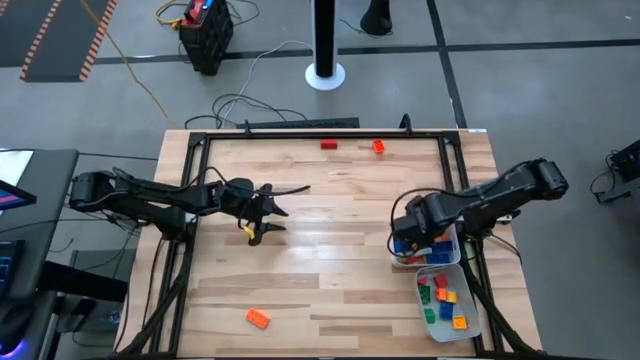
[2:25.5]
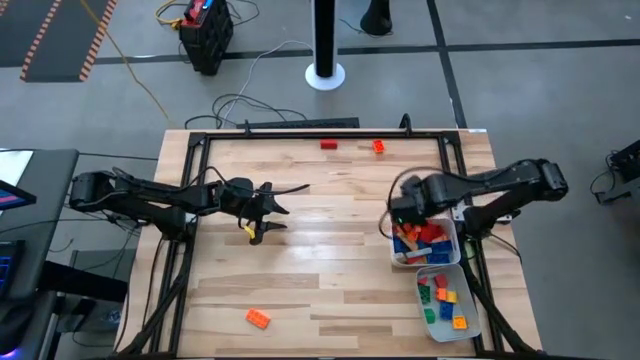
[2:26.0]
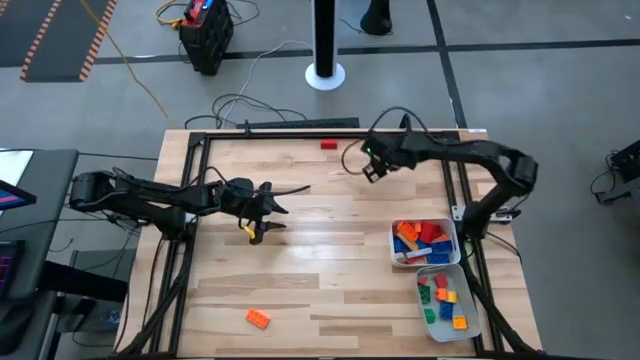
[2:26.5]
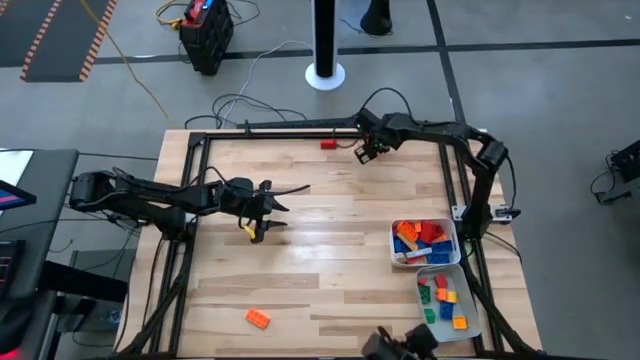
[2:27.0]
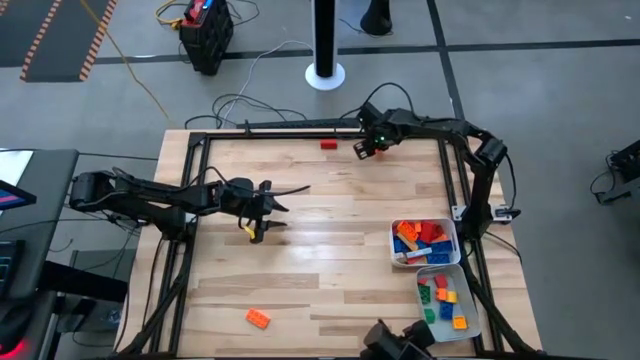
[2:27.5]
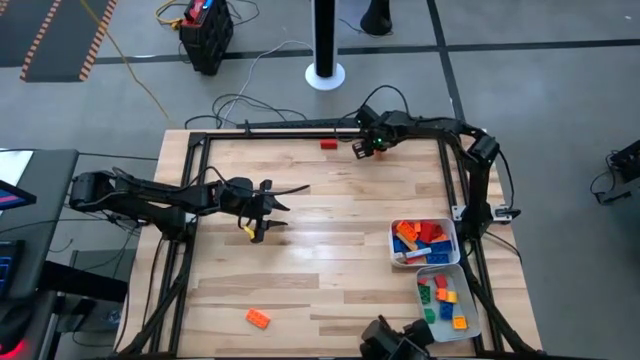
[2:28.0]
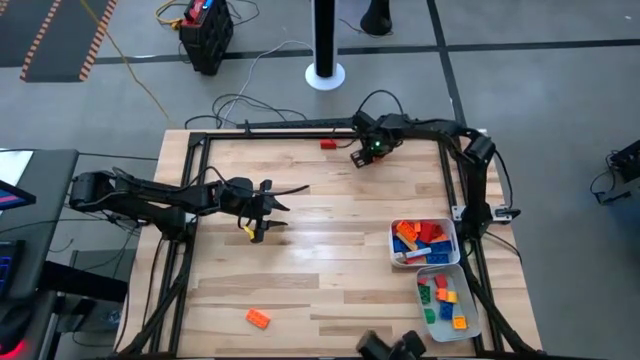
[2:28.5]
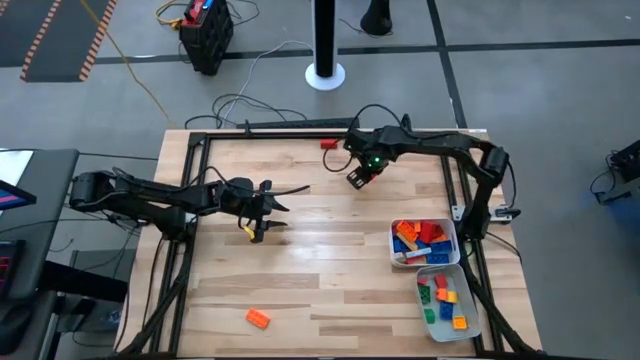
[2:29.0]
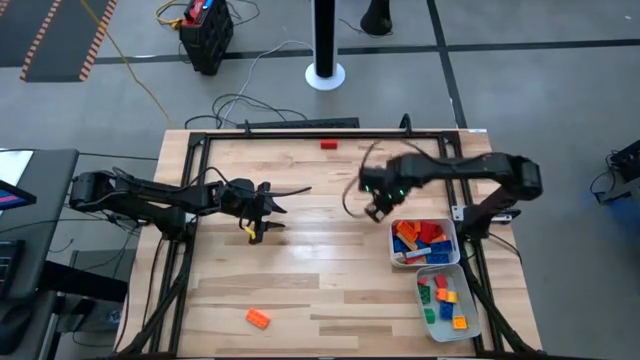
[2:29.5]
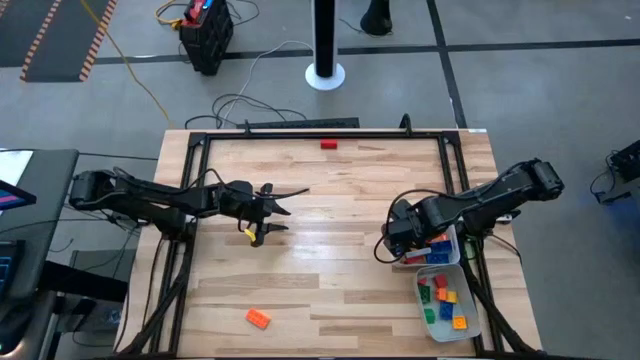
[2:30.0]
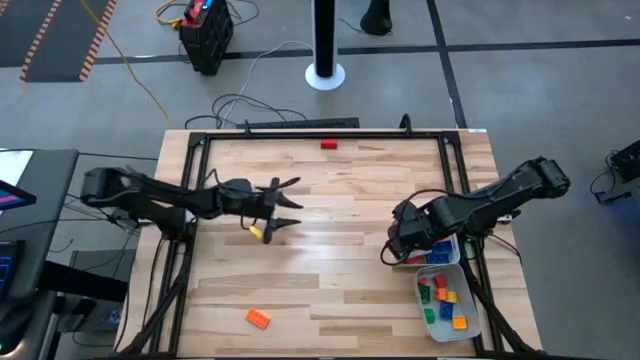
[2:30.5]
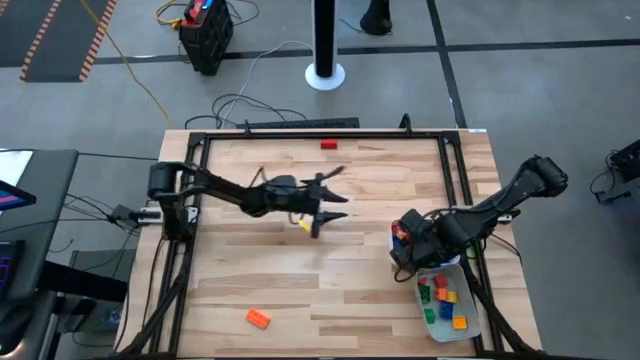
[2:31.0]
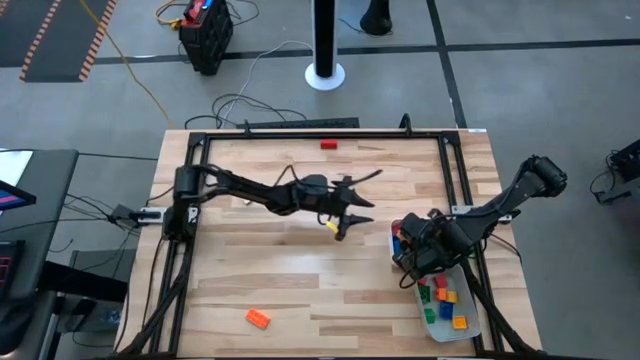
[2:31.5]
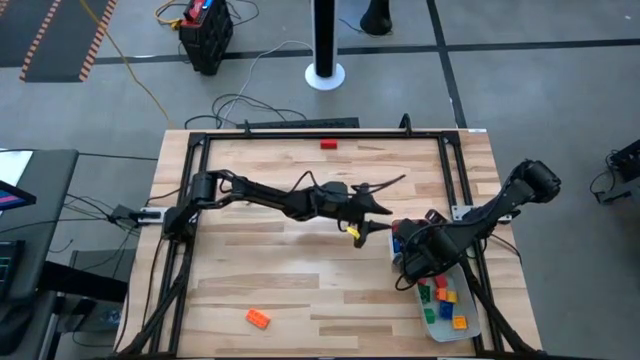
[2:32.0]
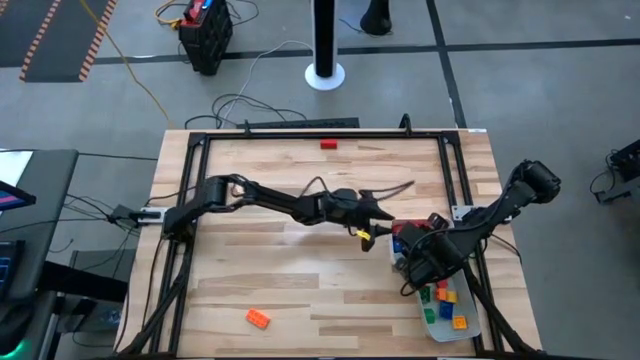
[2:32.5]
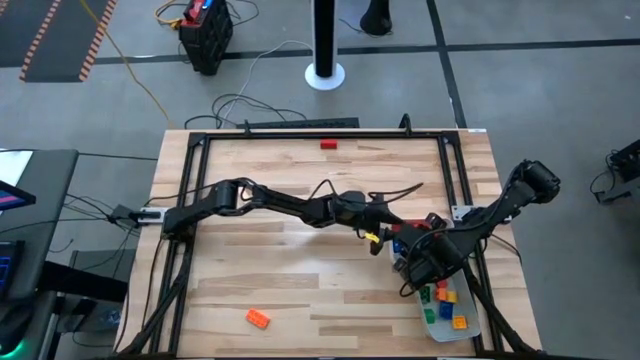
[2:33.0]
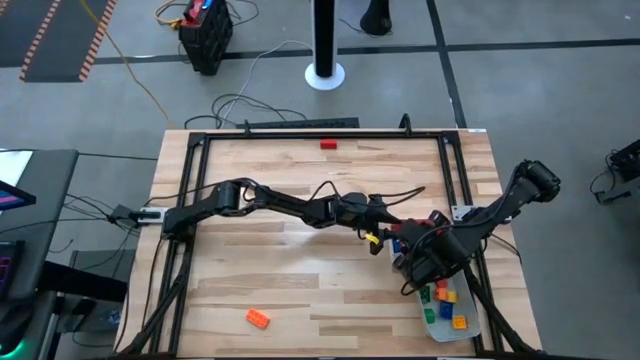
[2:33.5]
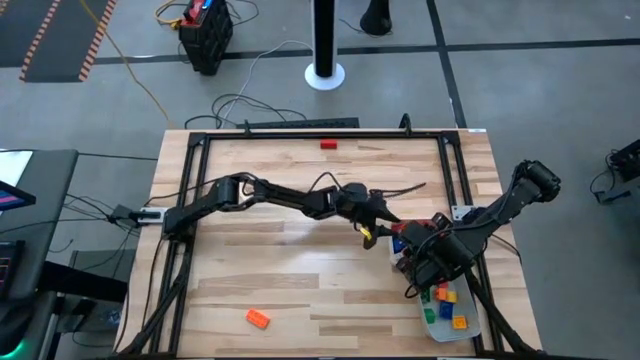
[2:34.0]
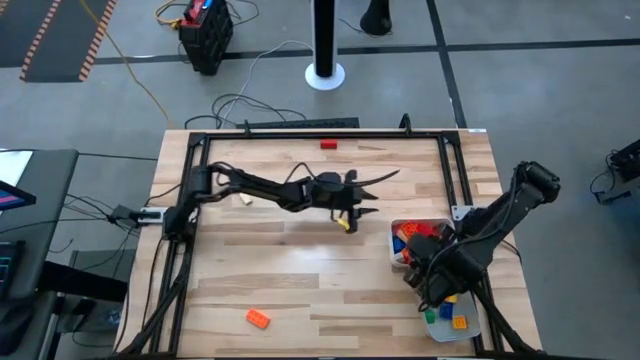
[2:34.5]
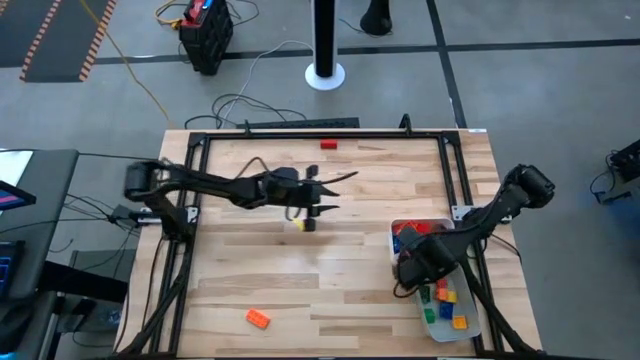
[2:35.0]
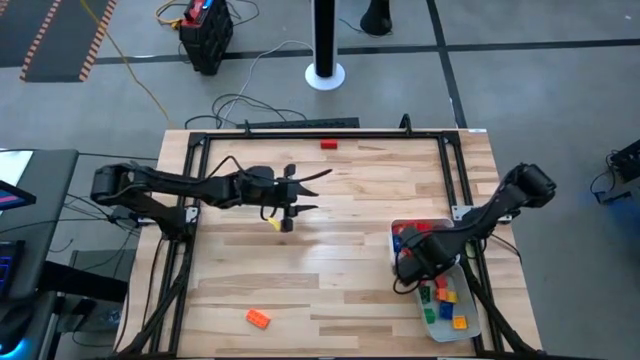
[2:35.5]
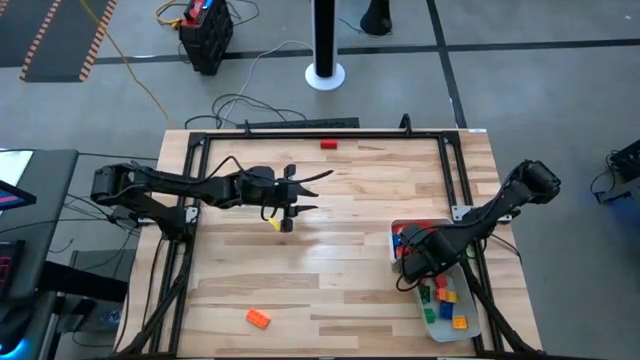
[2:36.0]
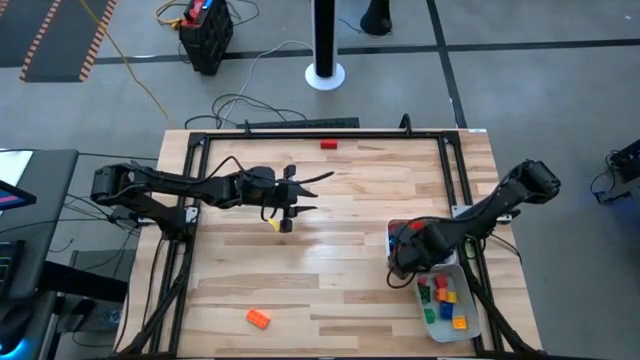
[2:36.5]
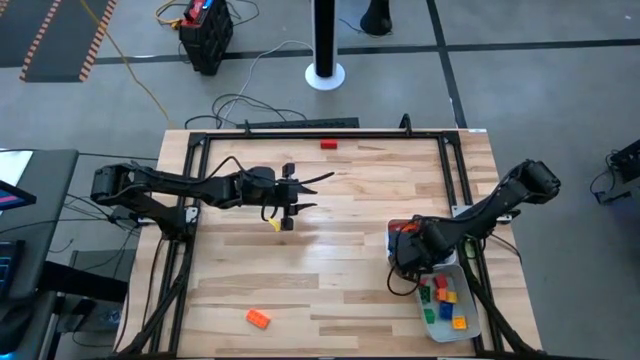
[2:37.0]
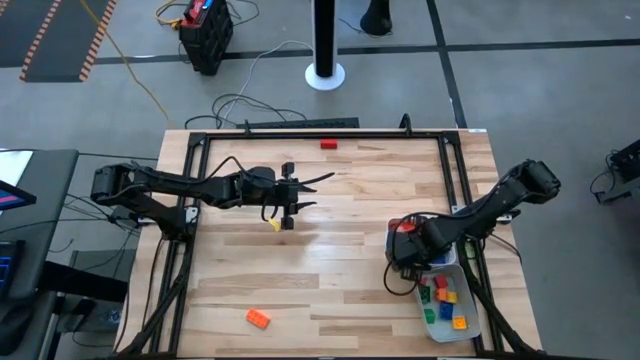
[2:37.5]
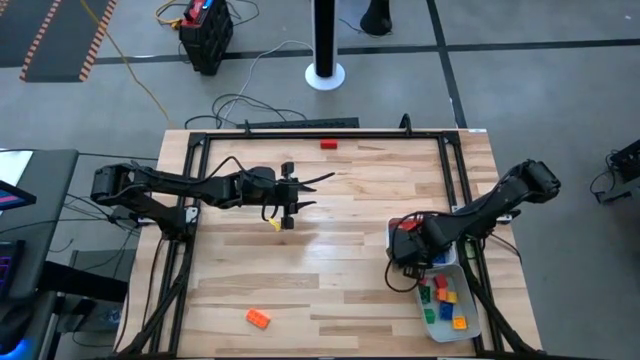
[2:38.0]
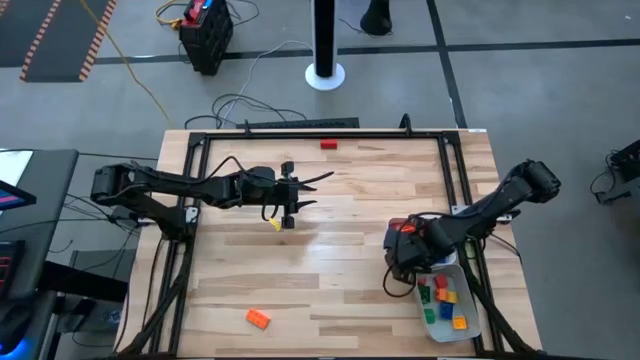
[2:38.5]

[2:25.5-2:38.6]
Task: Sort blocks by size
Put the 8 stud orange game piece into the grey bin

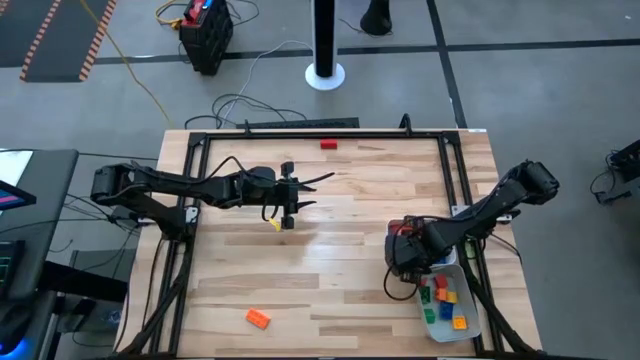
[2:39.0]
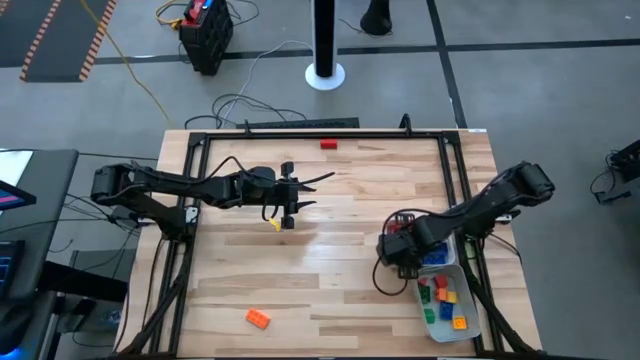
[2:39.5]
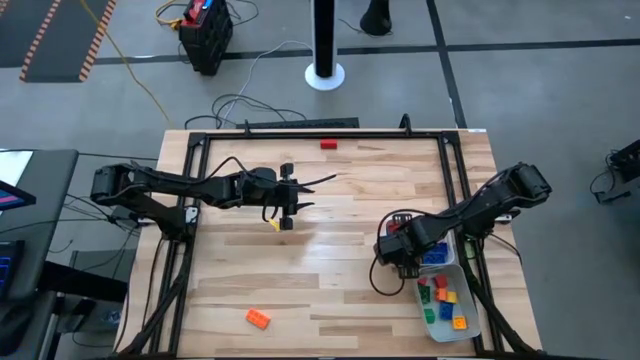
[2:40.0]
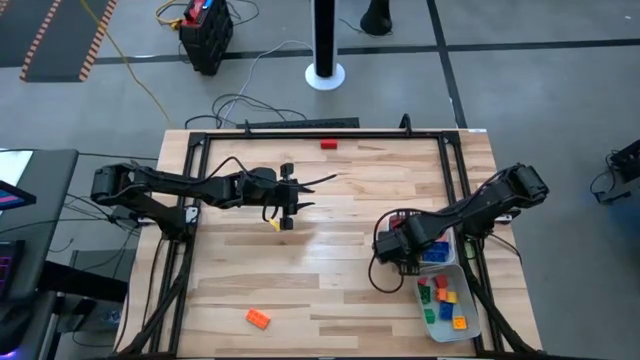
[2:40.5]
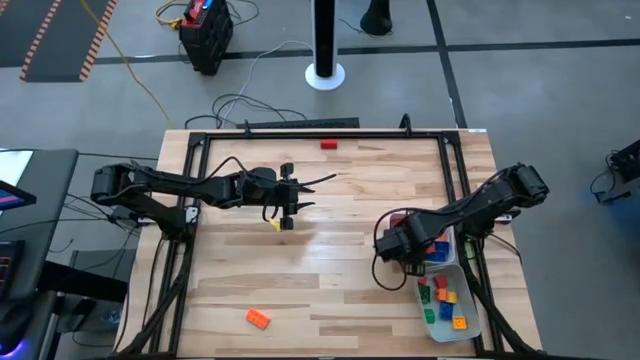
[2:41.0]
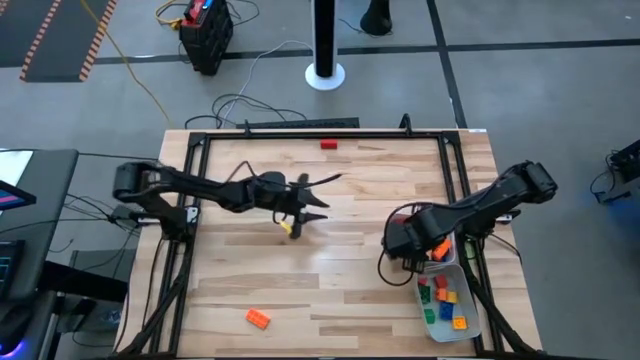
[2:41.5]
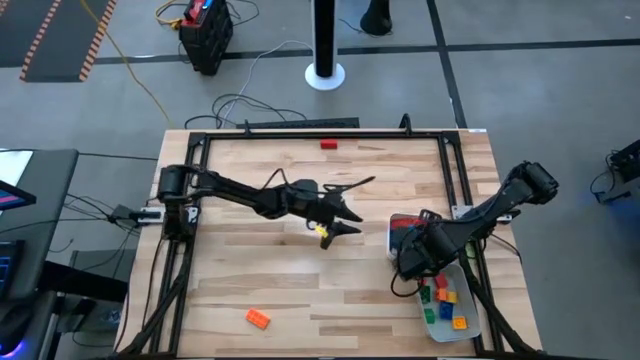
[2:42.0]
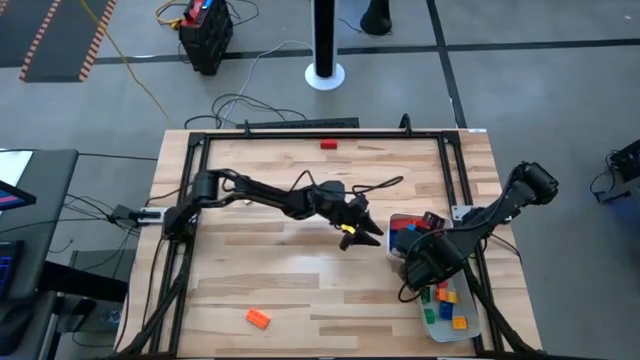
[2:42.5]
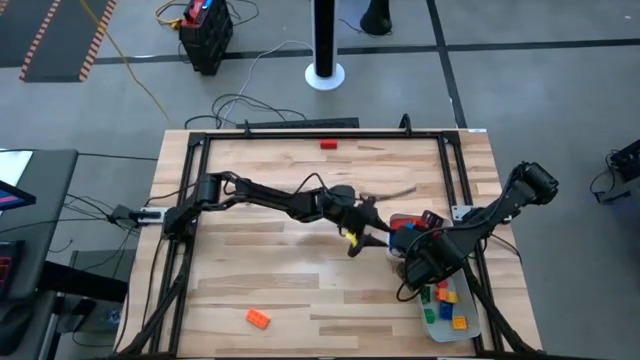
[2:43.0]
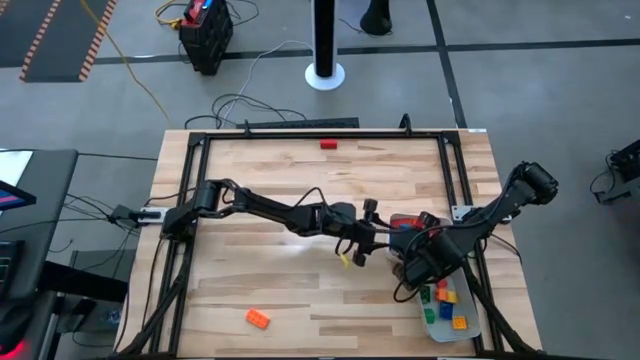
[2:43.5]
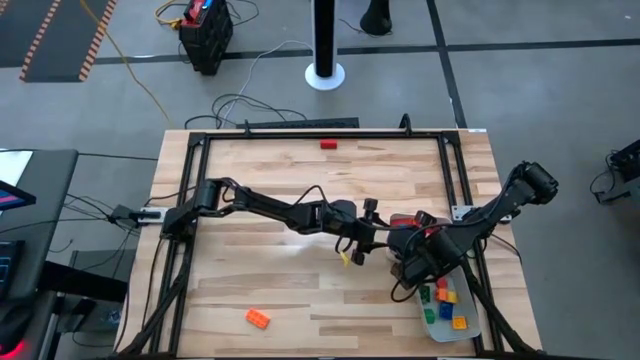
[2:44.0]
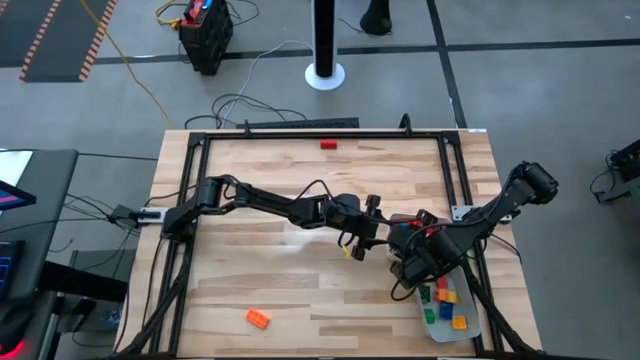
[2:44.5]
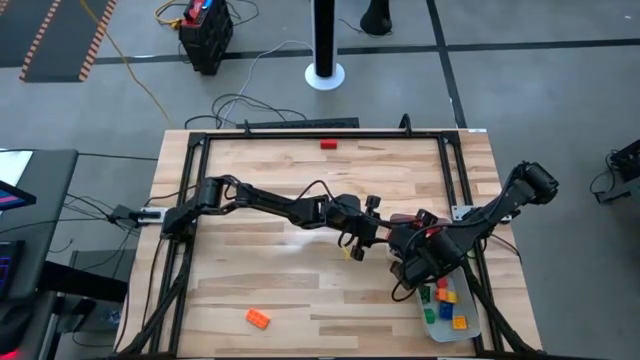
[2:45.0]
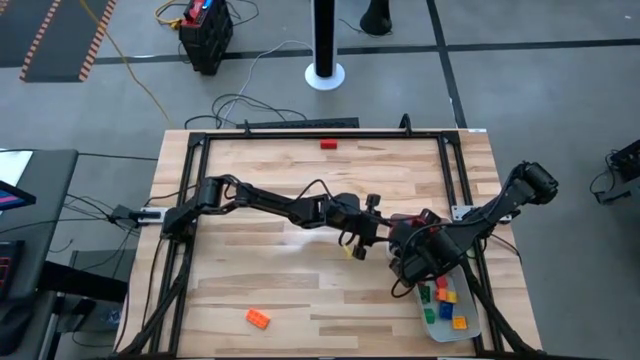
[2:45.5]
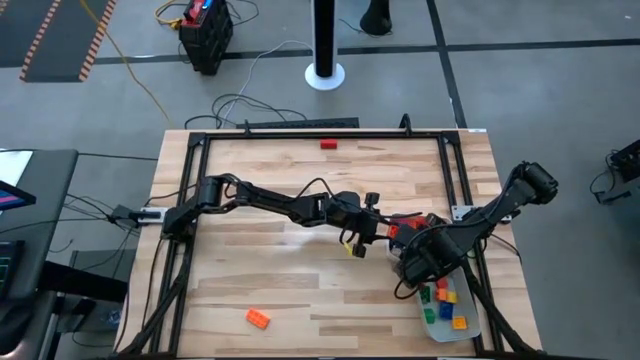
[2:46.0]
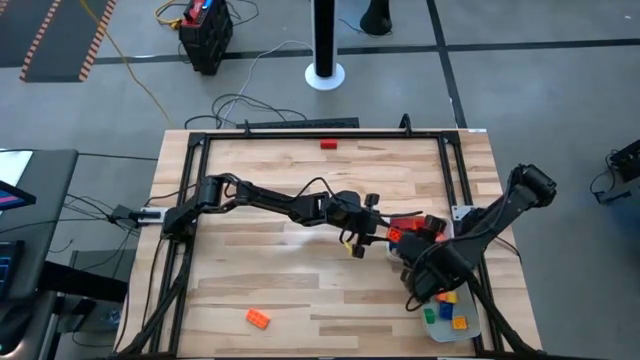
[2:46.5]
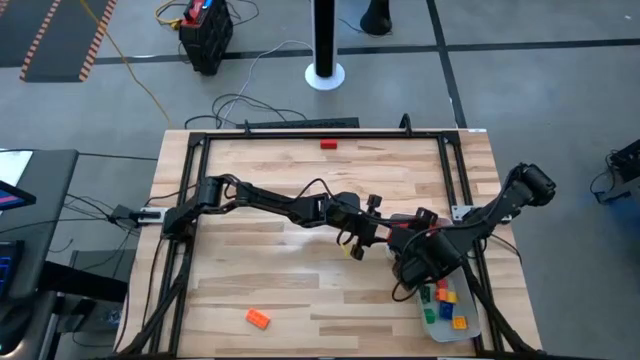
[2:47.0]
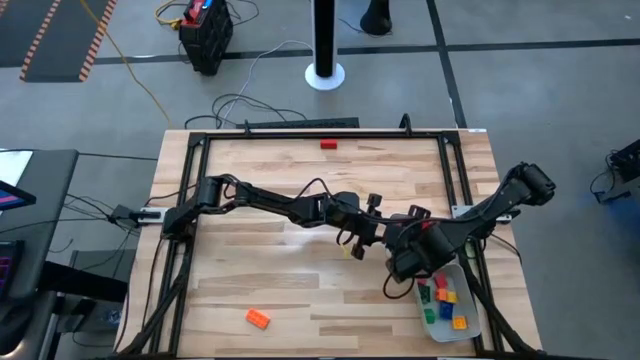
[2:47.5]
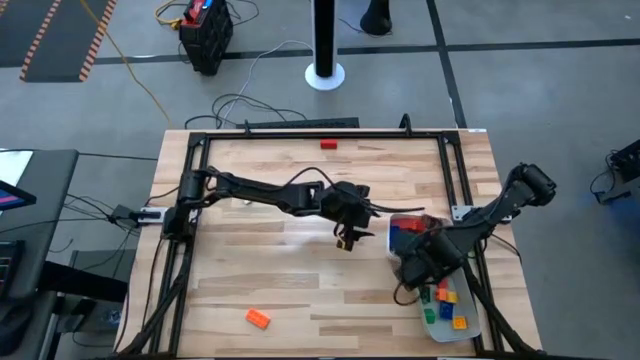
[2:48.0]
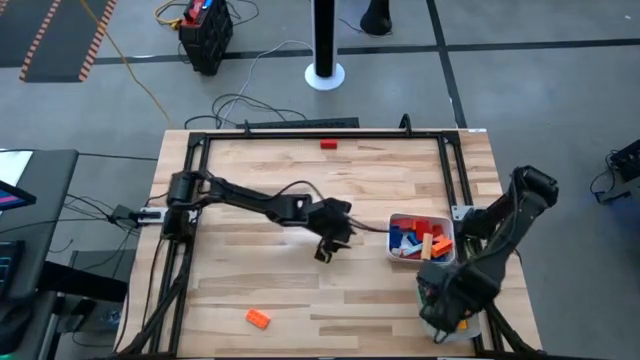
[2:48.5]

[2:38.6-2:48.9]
Put the 8 stud orange game piece into the grey bin
